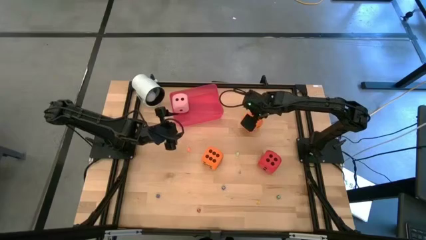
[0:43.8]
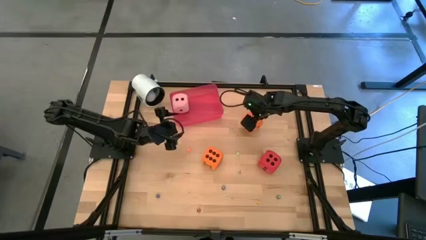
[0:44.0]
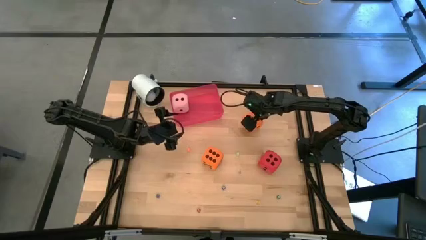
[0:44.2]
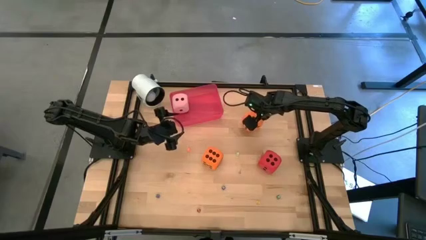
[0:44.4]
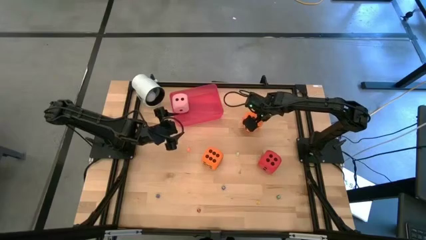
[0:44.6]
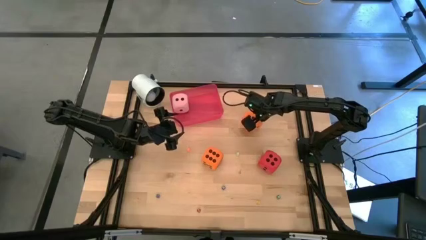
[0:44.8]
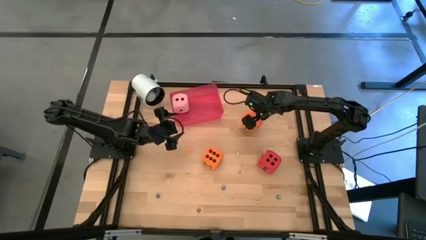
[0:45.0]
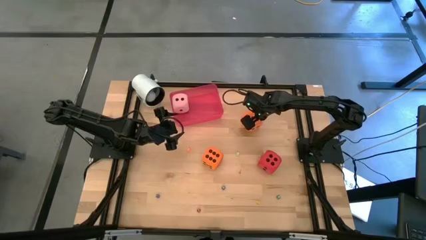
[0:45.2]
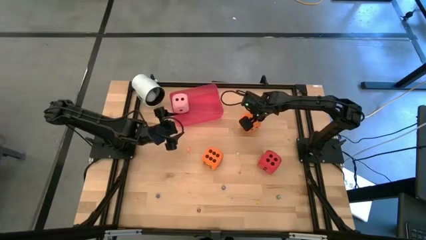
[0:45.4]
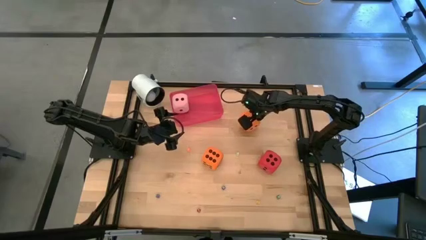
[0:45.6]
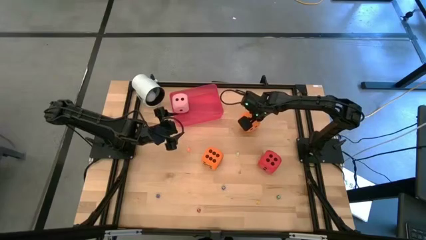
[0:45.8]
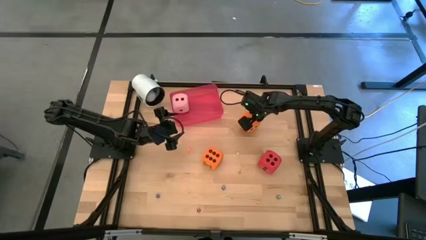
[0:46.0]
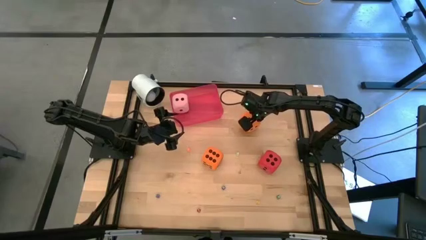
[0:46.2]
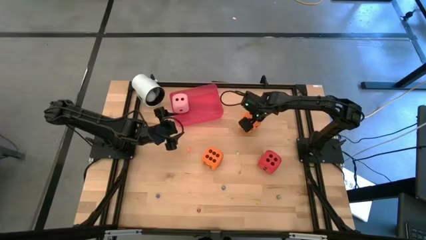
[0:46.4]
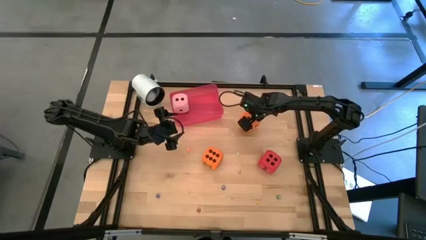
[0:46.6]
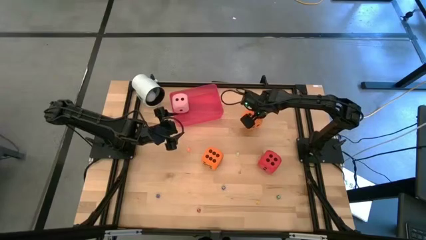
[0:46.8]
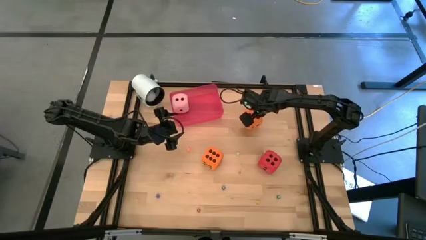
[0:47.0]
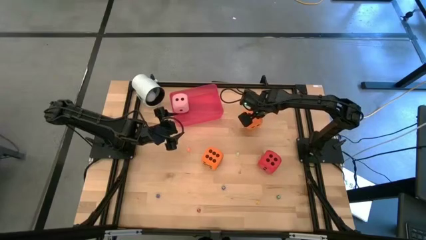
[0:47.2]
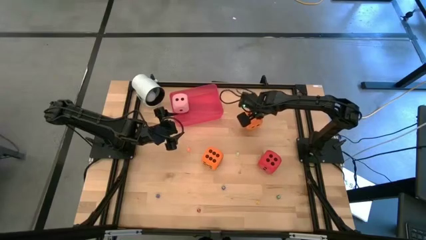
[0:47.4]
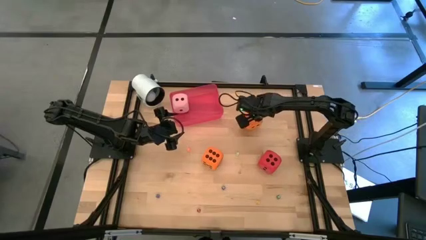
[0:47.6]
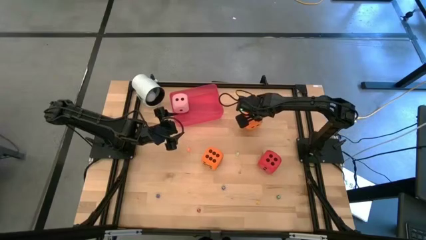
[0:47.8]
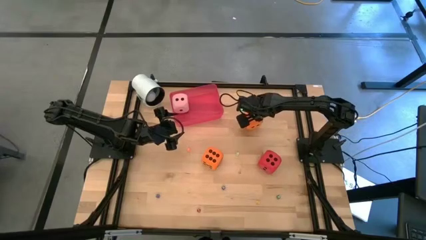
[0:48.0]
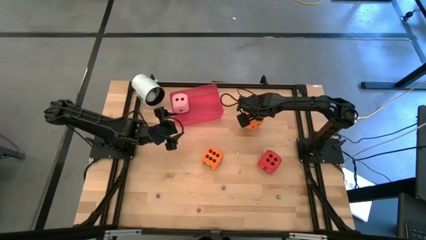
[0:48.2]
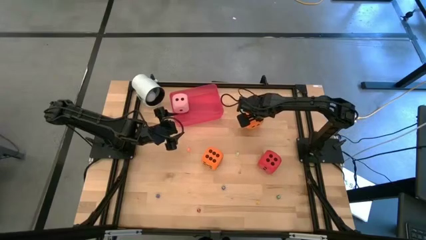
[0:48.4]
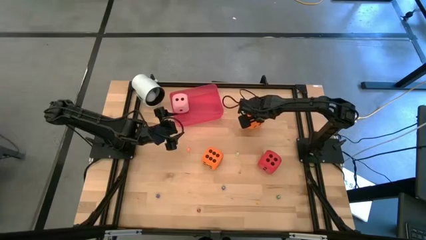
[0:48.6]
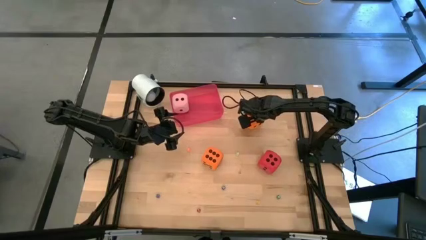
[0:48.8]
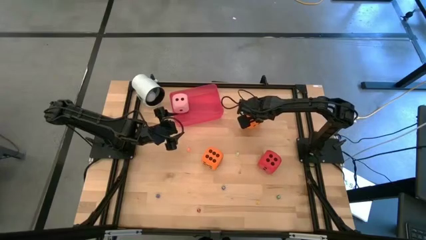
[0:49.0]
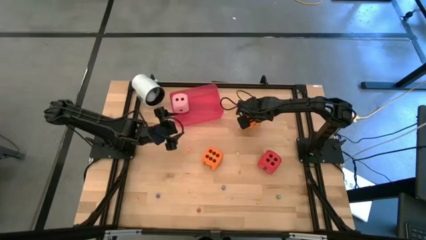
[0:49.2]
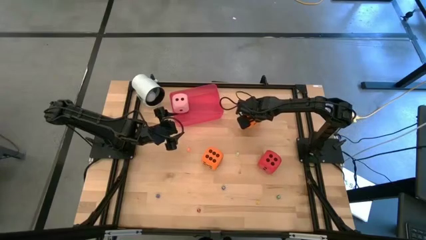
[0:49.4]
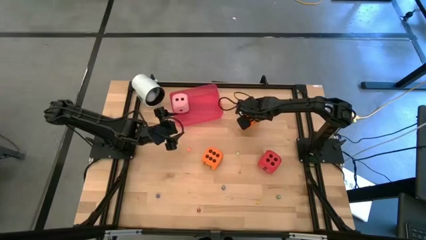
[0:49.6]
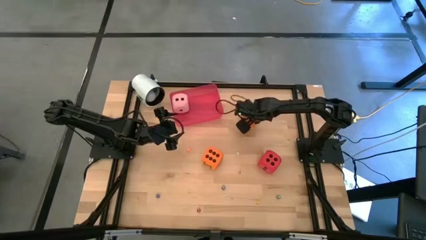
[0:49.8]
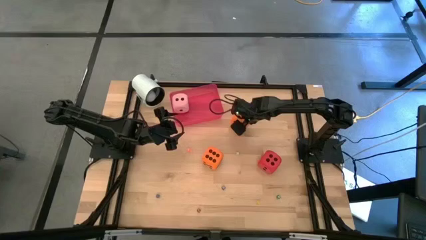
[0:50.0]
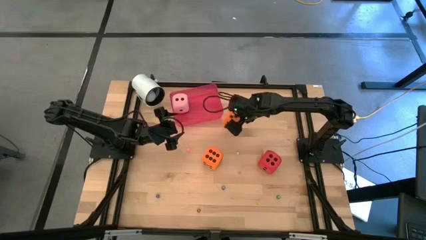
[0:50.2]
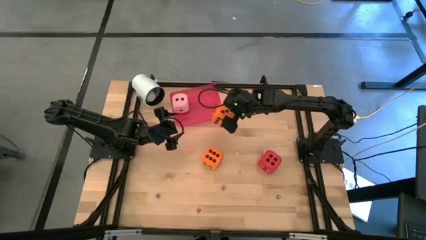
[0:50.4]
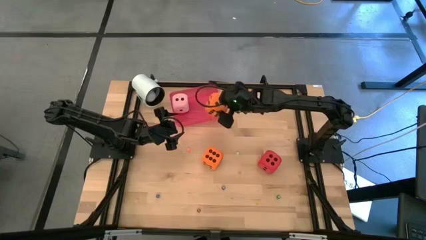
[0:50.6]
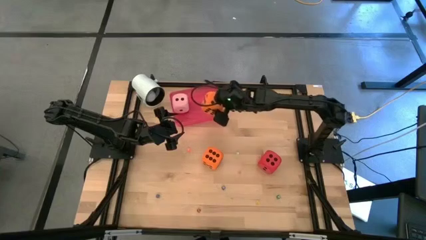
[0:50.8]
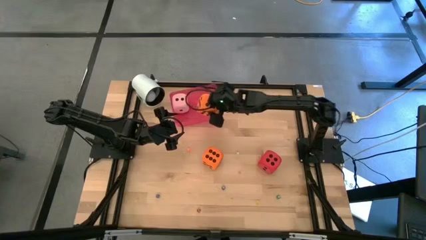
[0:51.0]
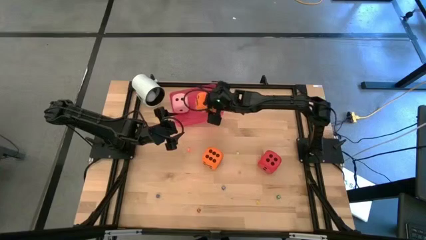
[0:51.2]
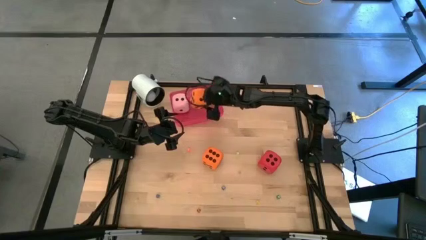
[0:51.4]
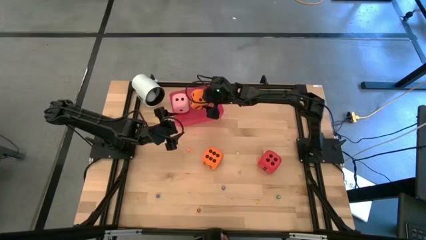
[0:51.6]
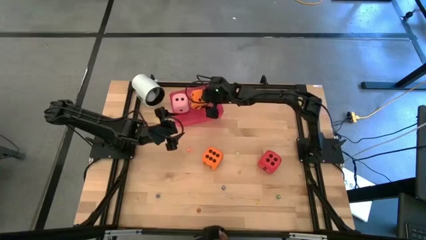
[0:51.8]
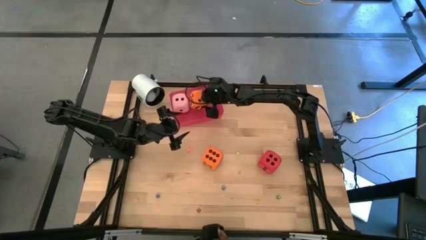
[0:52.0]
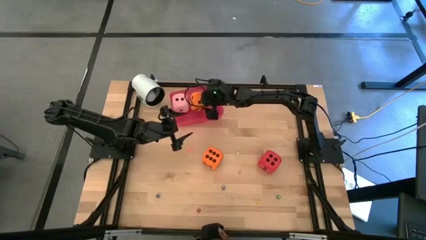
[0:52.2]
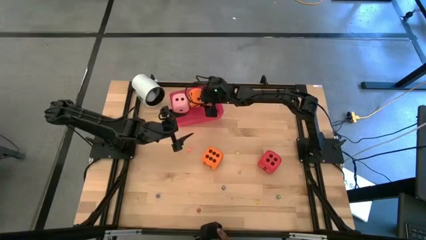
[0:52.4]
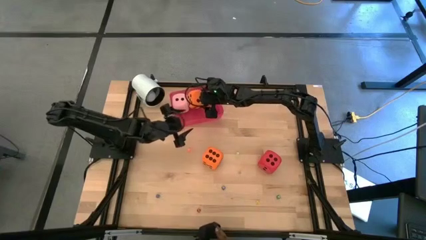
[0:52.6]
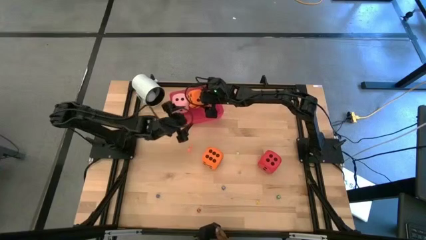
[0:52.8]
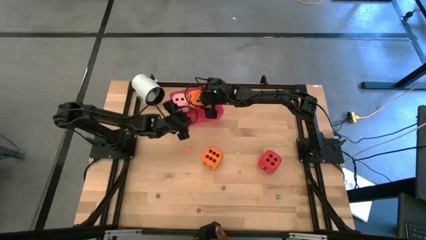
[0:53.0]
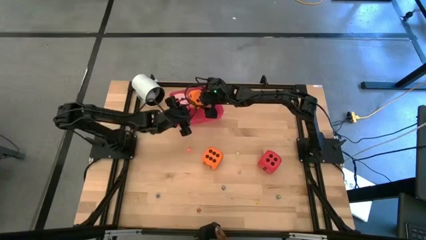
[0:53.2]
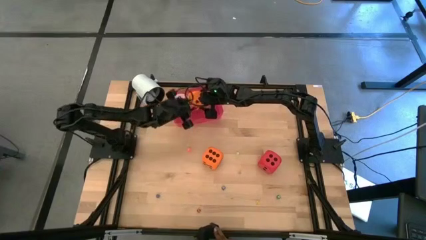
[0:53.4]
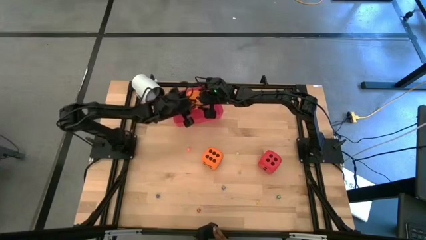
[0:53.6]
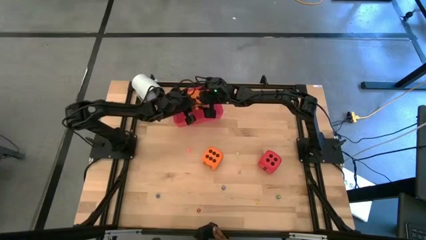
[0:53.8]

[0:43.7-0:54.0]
Task: Pick & Place Dice
Put the right large orange die into the red bin
